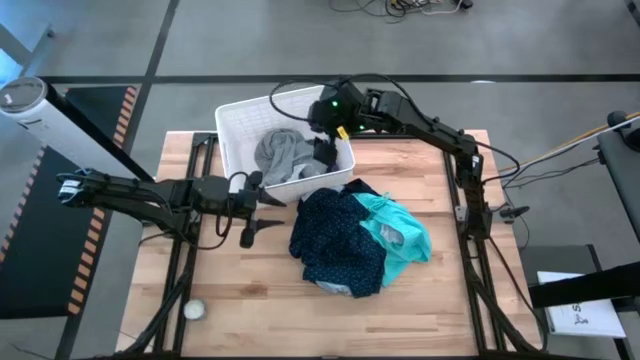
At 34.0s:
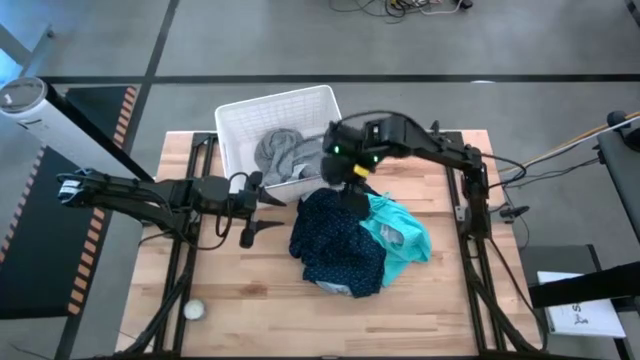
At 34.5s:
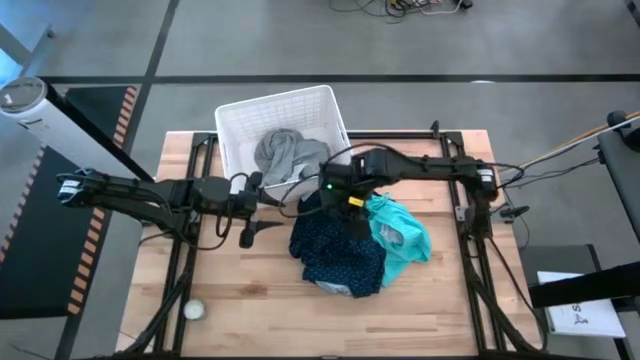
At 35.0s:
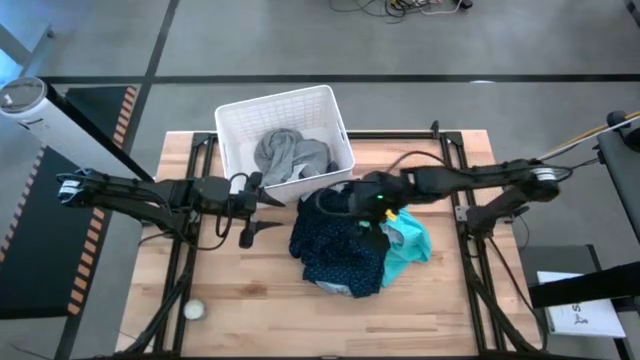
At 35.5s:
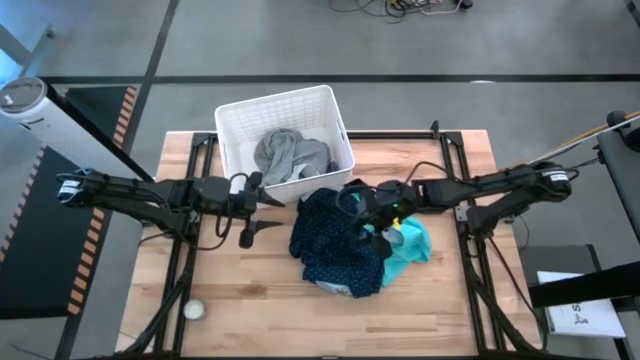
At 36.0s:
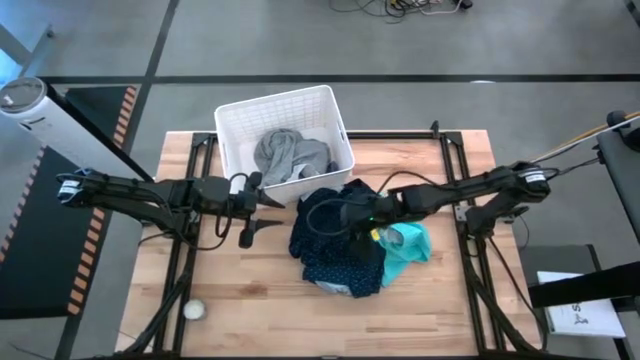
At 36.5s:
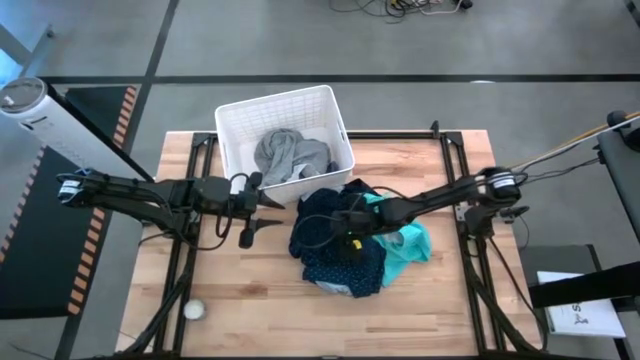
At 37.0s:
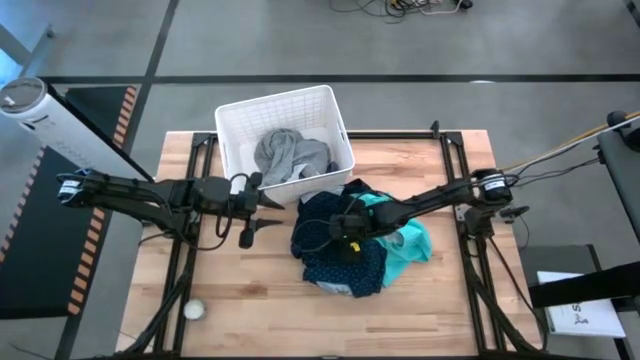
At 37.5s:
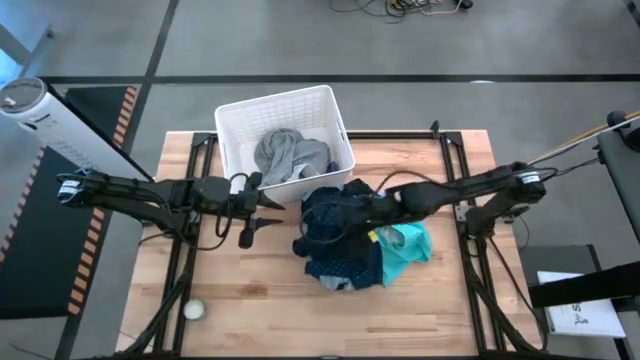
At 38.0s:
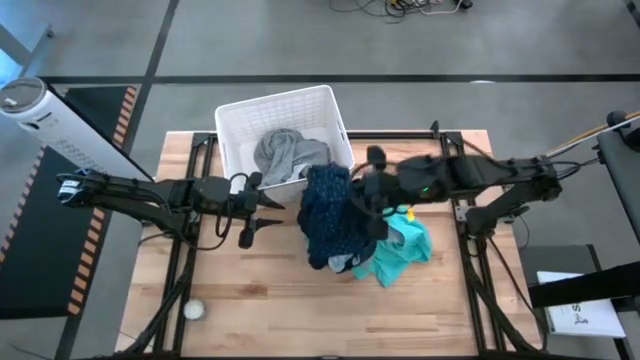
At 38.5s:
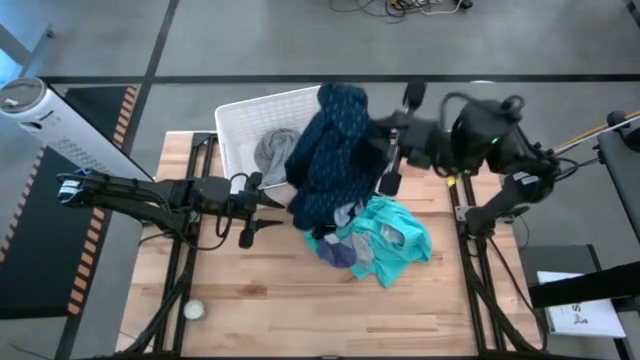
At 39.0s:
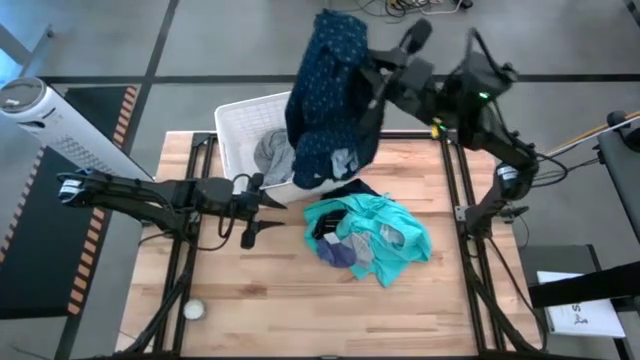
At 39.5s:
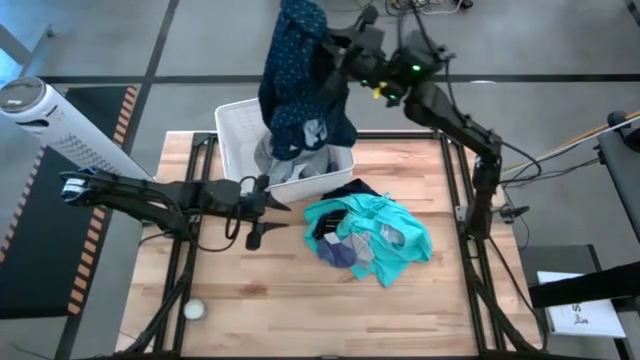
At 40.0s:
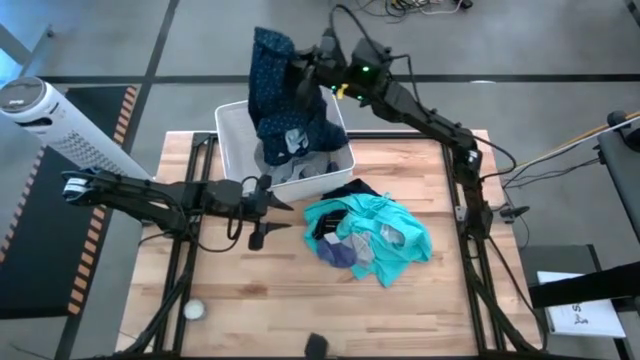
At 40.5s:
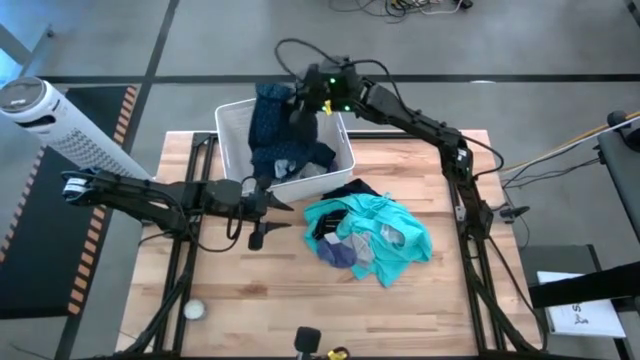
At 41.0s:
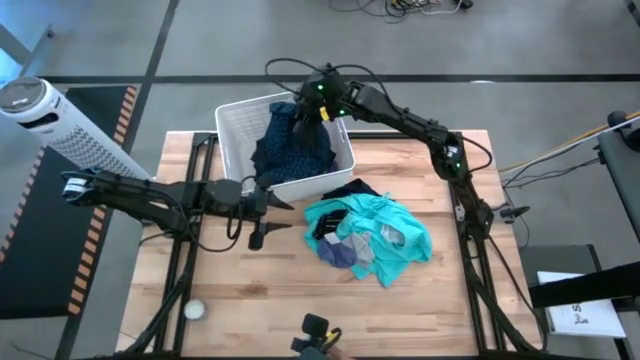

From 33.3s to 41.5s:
Task: Sort clothes
Put the dark blue shirt into the white laundry bin

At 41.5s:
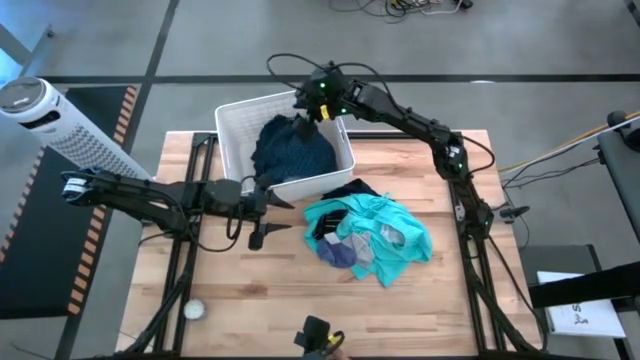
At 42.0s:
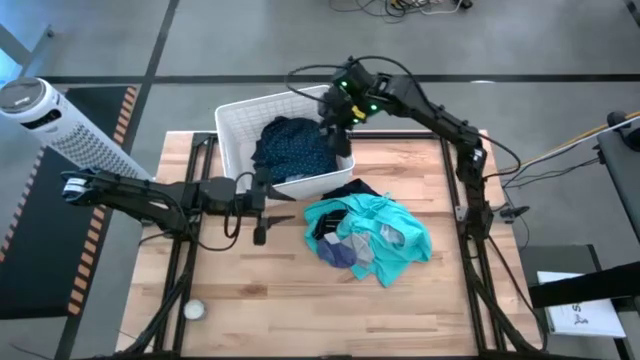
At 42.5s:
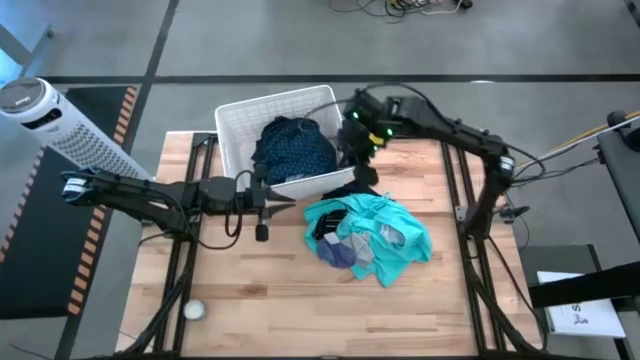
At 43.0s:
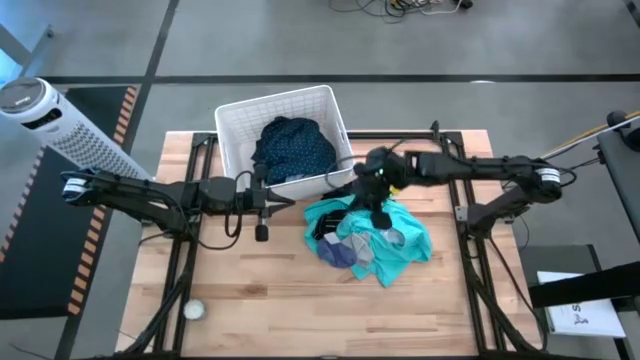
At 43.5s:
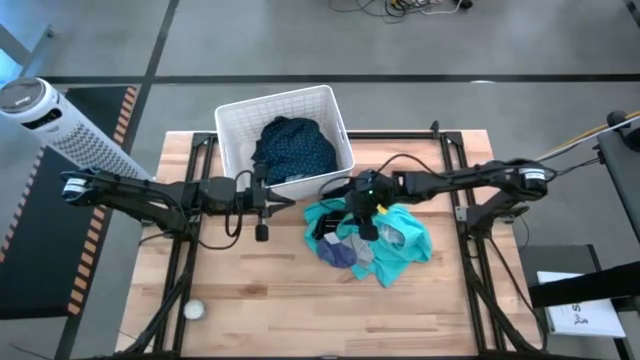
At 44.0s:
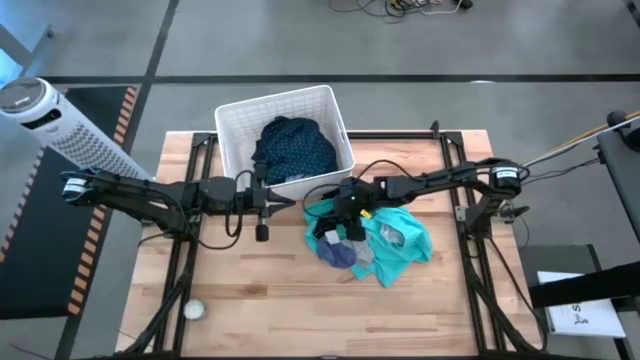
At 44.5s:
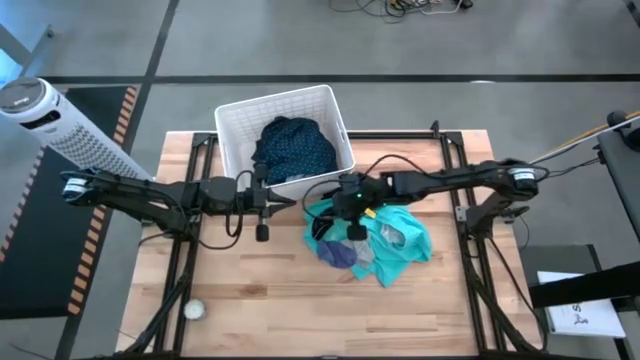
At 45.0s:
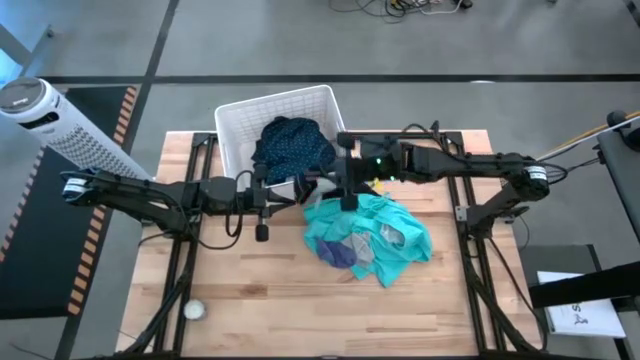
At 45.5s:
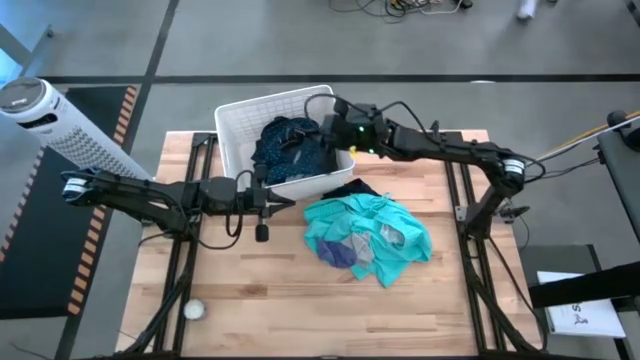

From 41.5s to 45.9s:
Put the black sock into the white laundry bin

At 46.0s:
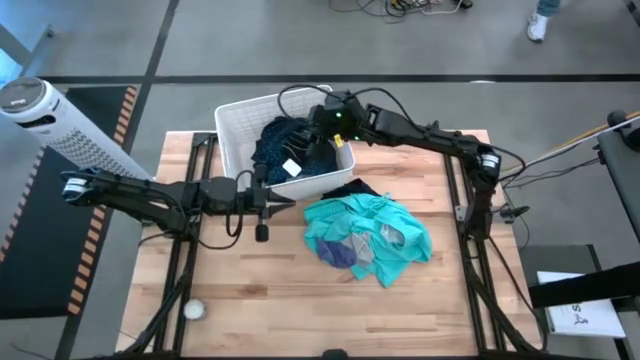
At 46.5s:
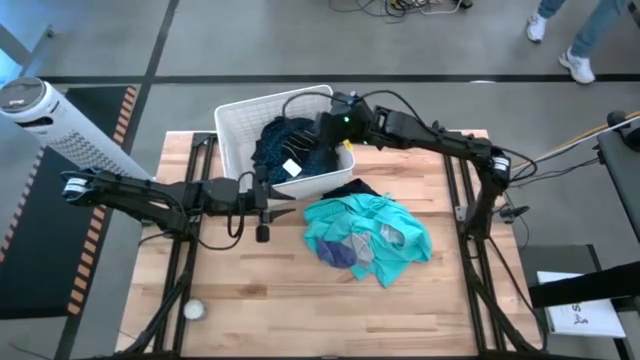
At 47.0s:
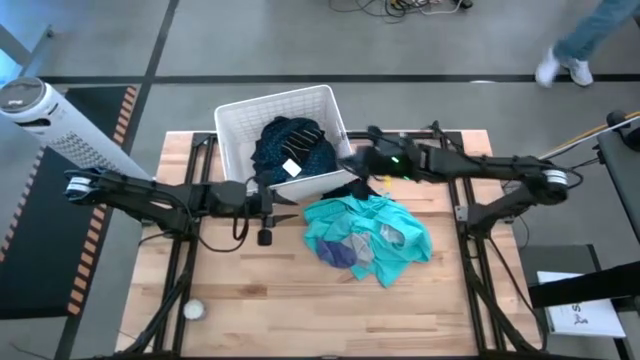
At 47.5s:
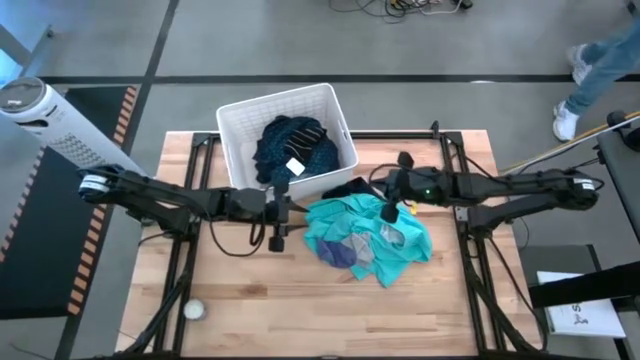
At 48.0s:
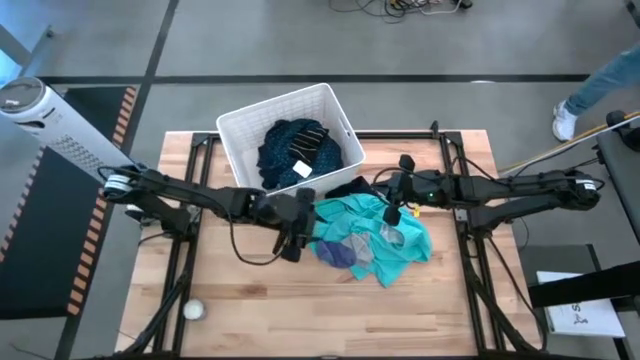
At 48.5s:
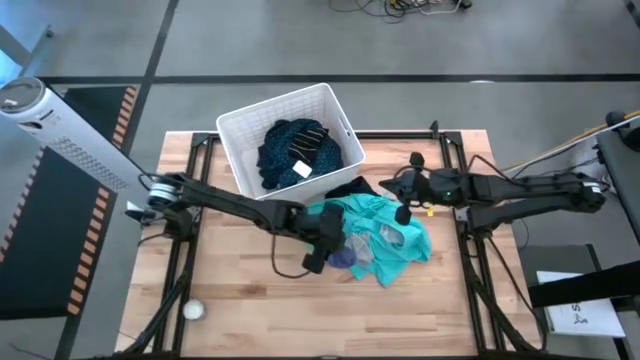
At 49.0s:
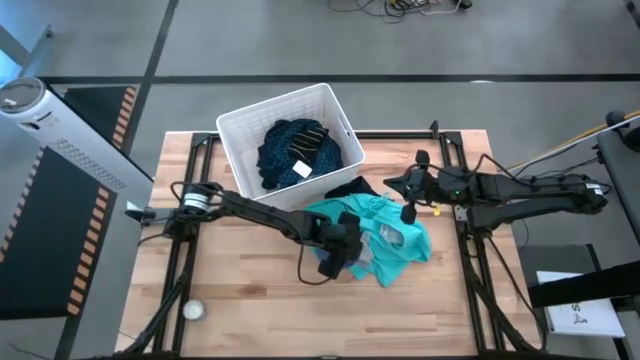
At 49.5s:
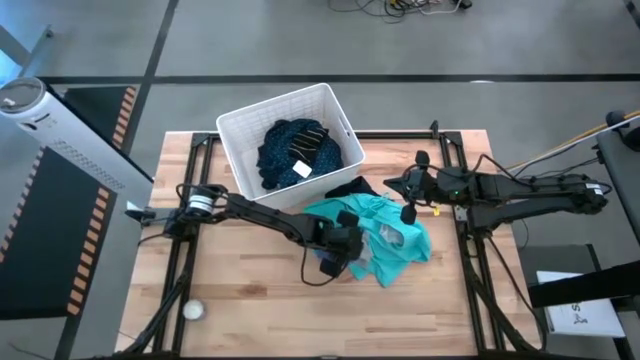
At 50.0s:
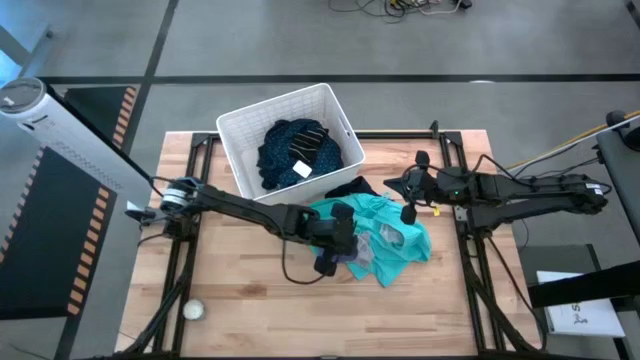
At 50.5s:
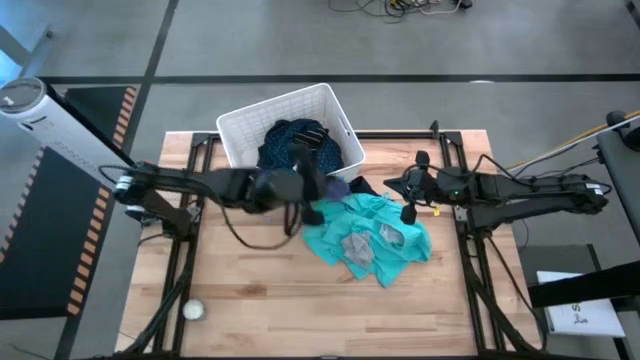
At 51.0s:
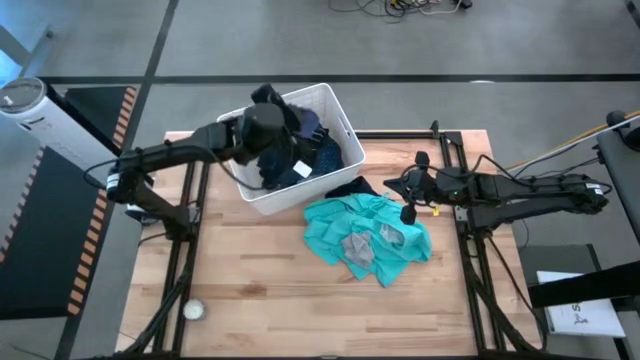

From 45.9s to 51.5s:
Put the purple sock into the white laundry bin

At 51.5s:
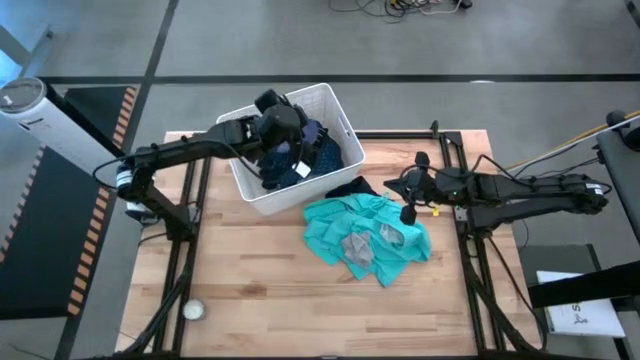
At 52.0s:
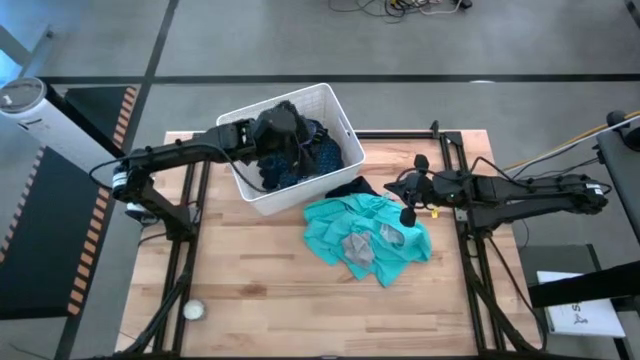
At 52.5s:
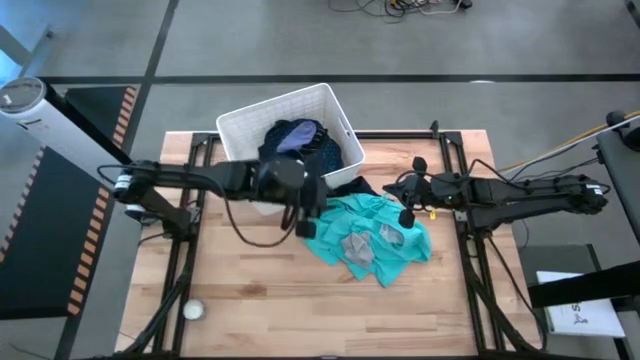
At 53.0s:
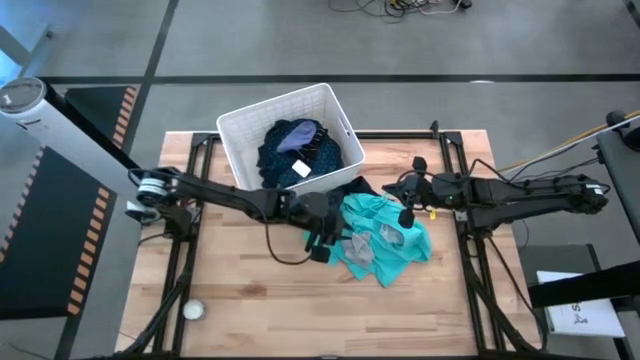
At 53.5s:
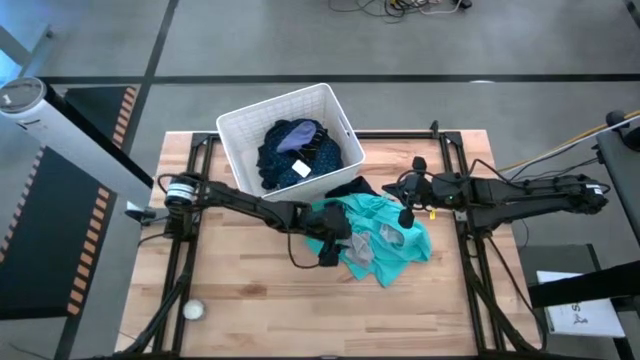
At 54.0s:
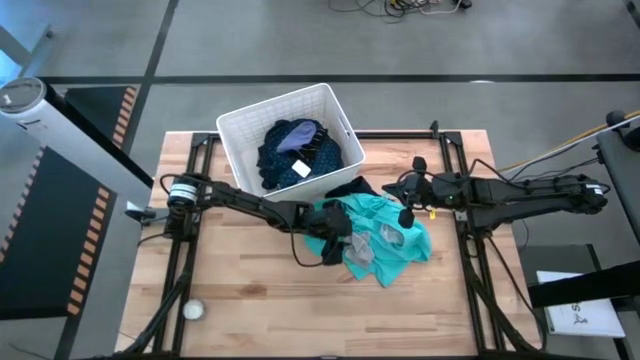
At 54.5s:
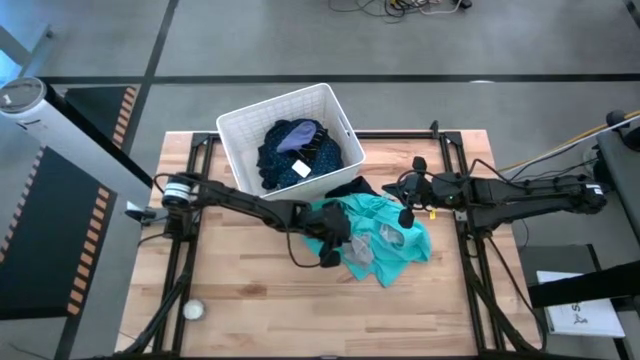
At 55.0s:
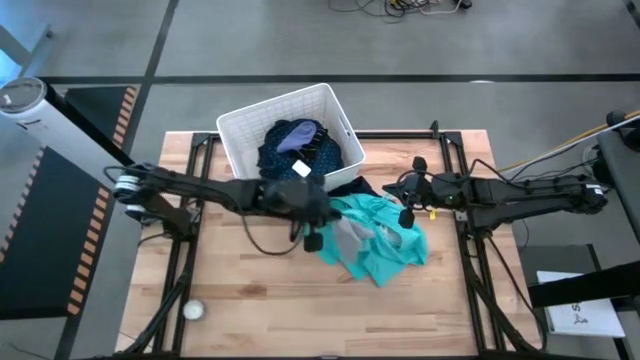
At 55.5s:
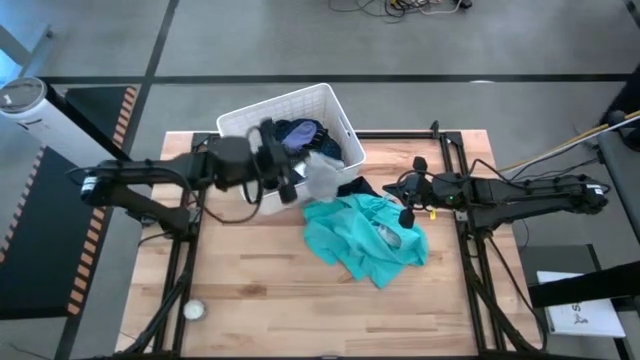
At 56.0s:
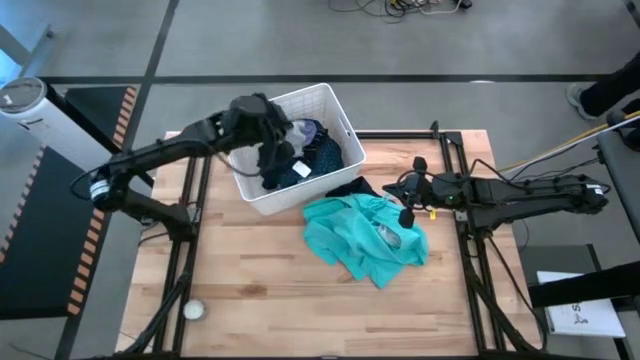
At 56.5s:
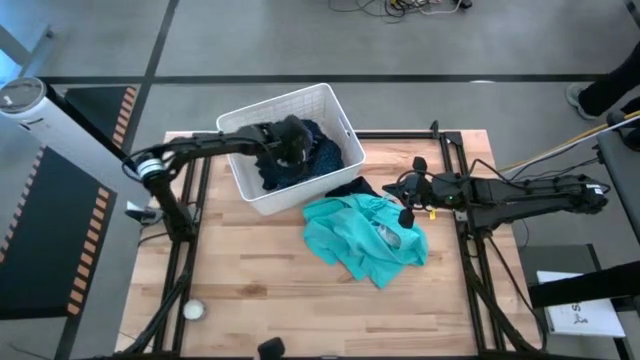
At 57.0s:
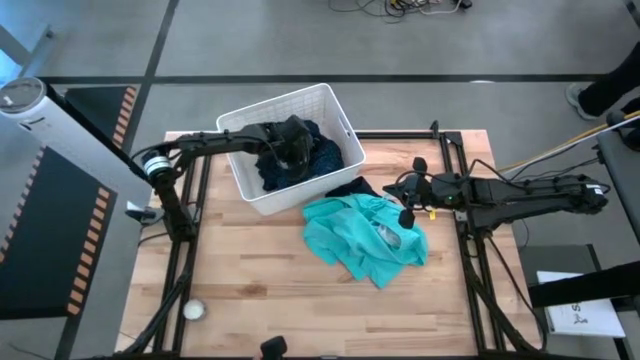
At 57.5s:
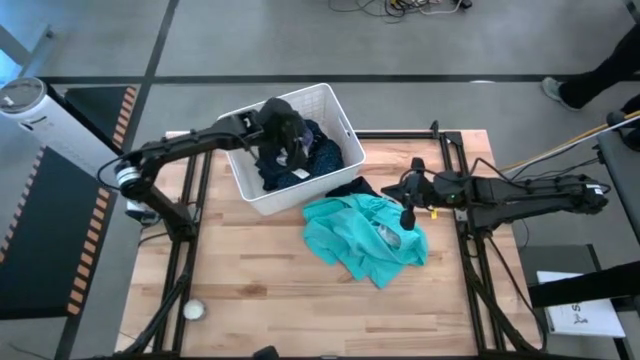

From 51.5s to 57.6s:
Put the gray sock into the white laundry bin
